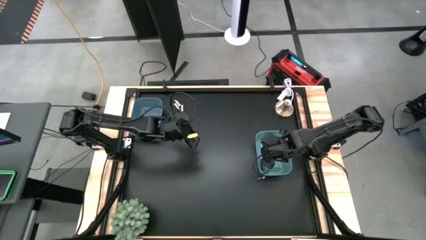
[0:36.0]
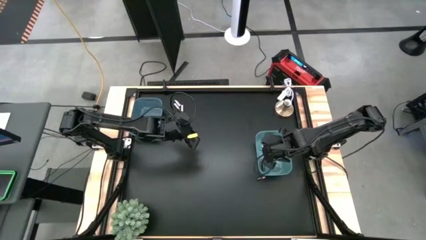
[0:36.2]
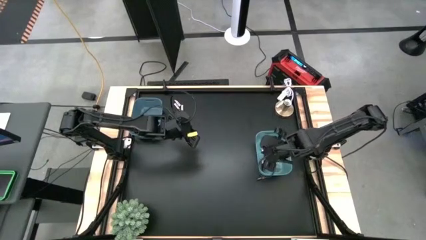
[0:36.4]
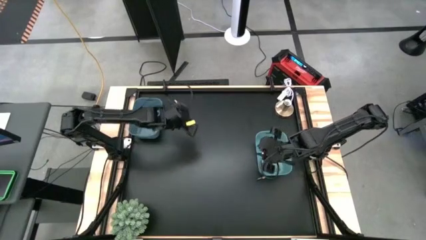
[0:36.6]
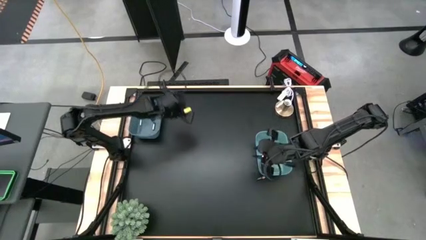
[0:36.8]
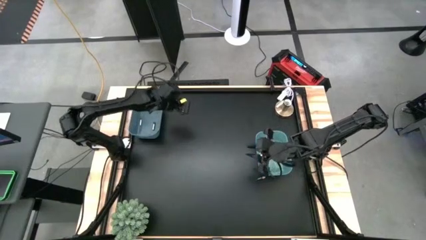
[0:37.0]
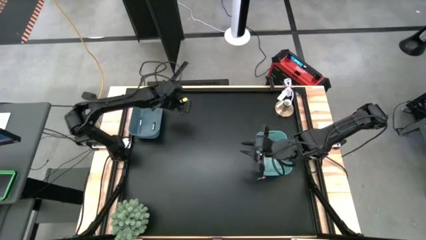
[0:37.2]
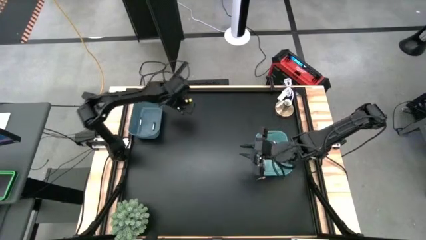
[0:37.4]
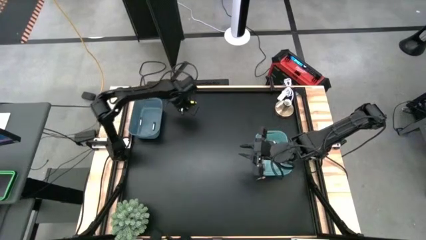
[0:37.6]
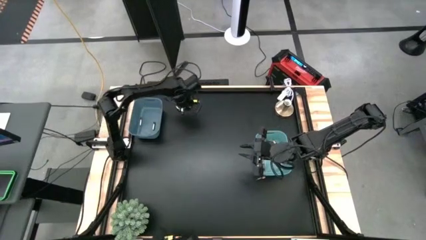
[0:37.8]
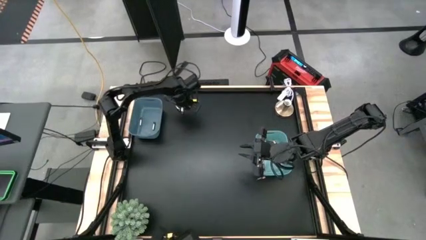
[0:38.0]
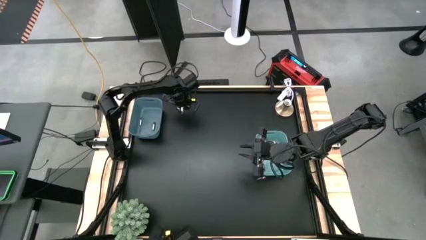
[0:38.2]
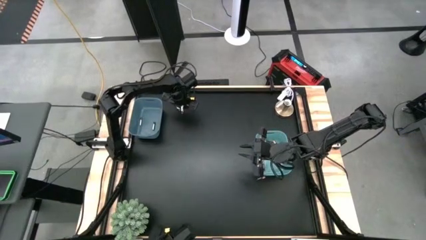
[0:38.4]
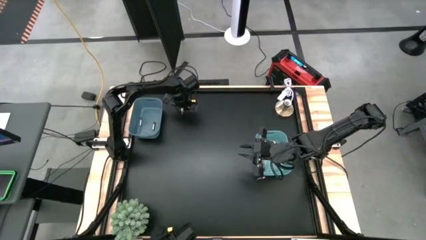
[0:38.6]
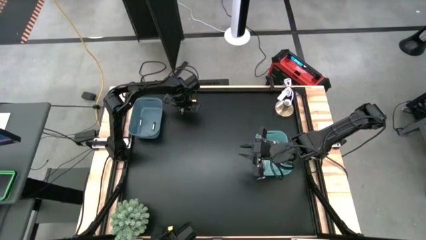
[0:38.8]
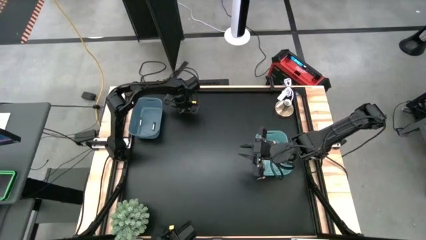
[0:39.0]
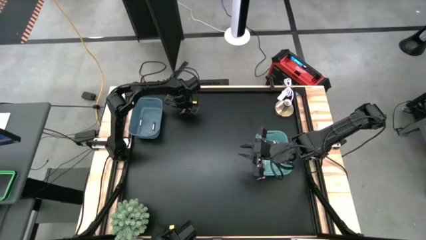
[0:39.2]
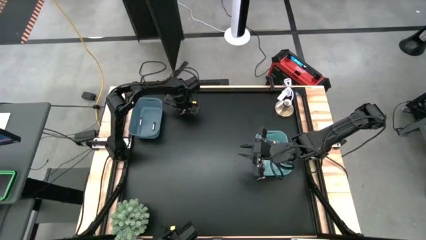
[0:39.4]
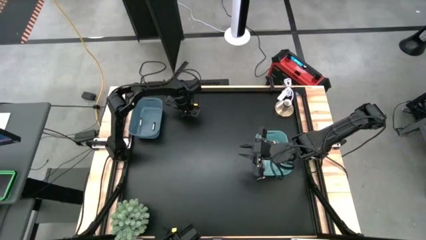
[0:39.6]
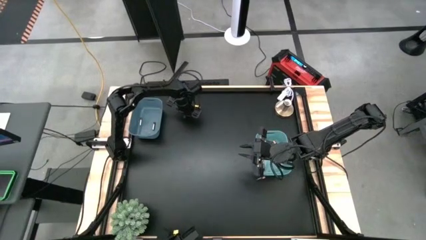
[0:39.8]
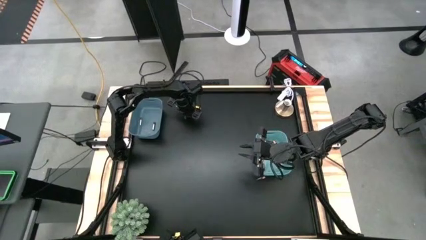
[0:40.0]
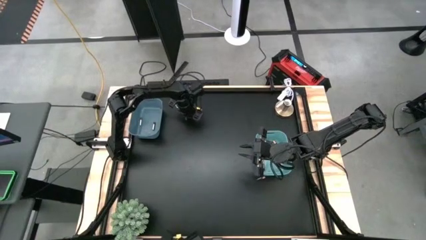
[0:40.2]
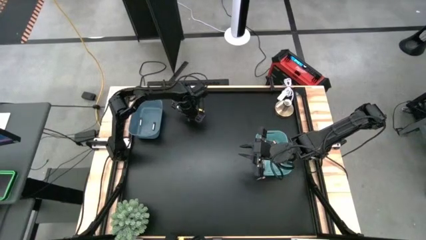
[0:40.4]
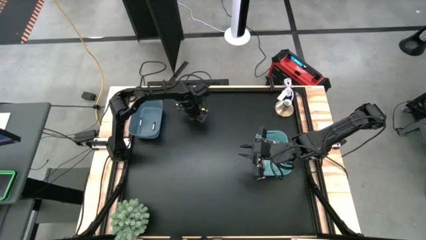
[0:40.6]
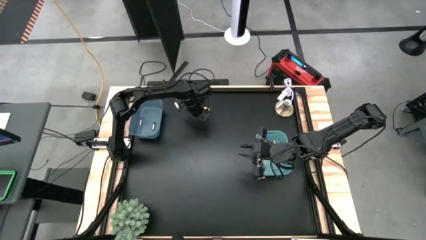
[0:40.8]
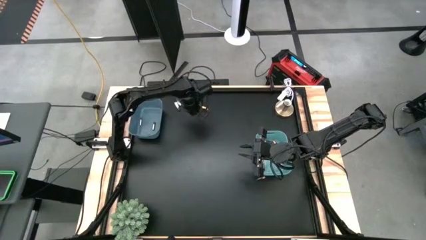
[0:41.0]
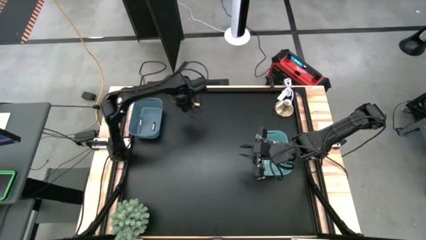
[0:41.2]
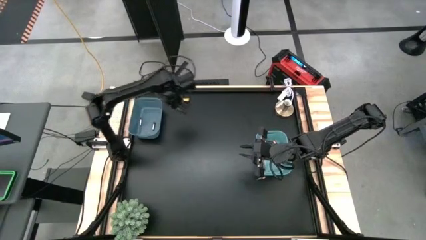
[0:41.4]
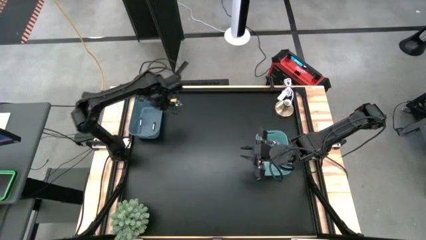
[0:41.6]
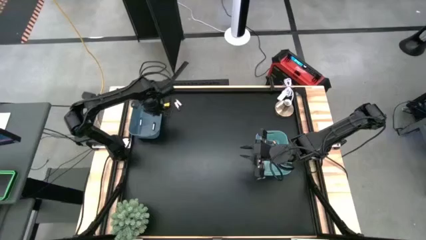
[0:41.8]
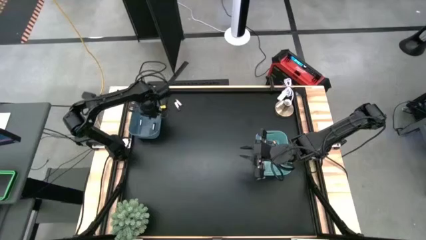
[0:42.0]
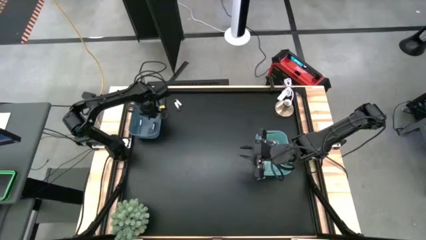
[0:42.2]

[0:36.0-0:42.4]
Task: Sort batteries
Put the silver battery into the blue bin

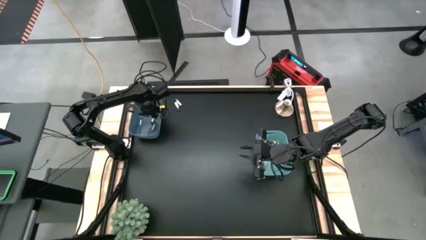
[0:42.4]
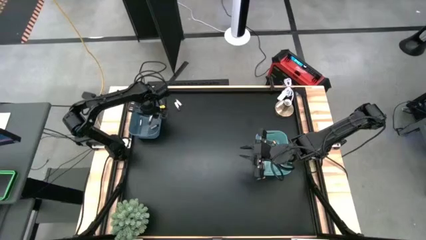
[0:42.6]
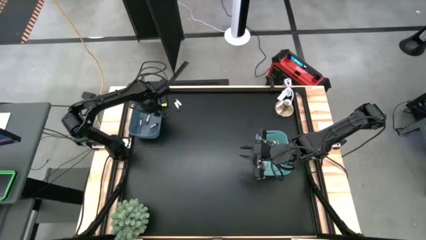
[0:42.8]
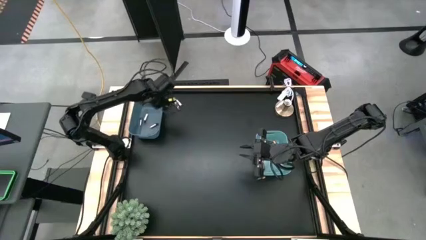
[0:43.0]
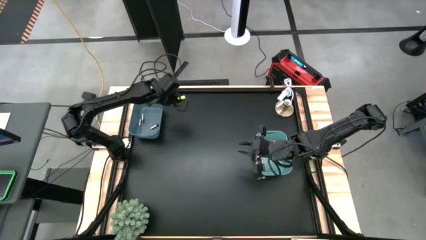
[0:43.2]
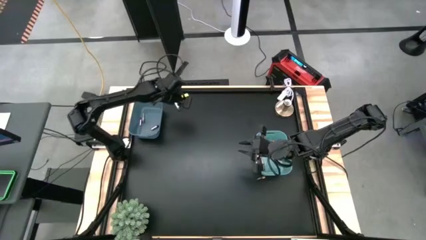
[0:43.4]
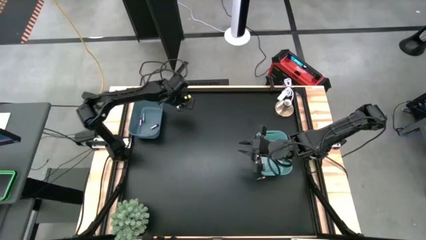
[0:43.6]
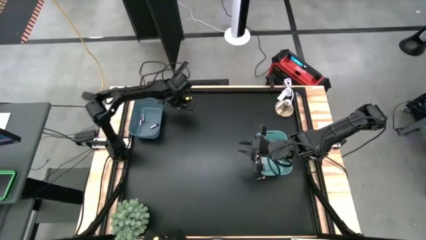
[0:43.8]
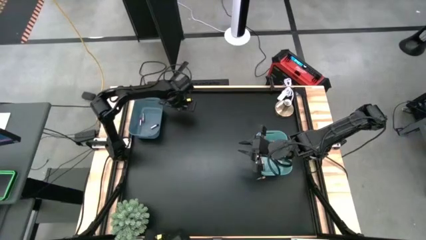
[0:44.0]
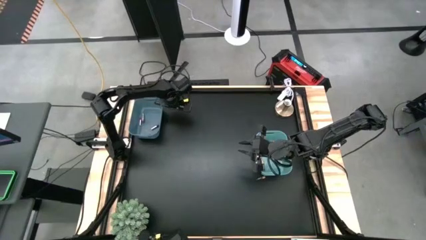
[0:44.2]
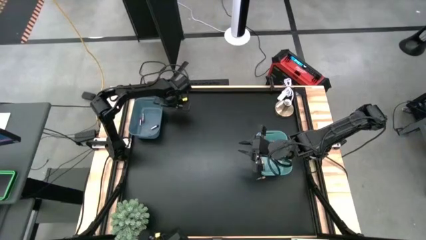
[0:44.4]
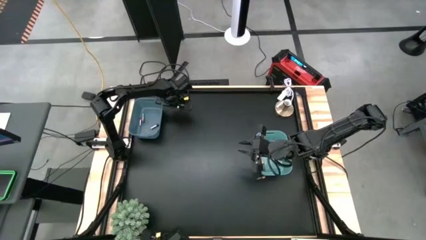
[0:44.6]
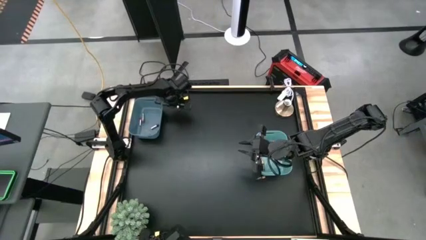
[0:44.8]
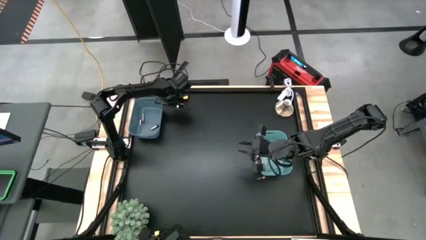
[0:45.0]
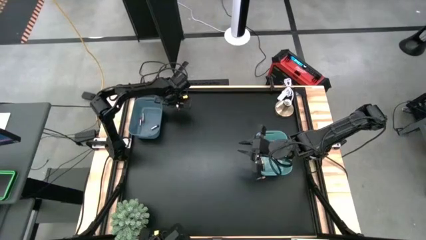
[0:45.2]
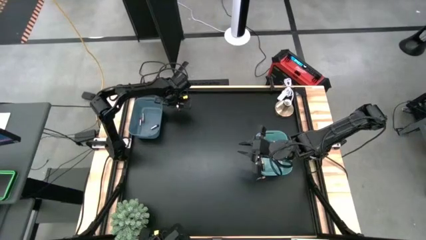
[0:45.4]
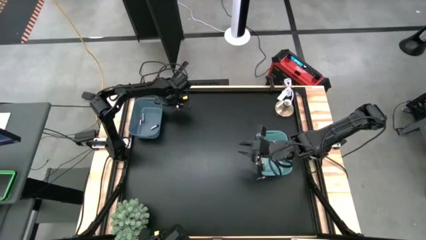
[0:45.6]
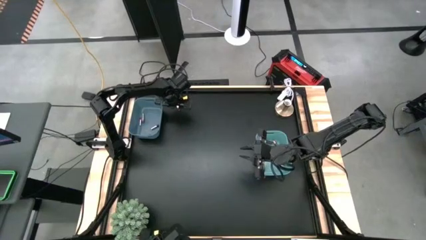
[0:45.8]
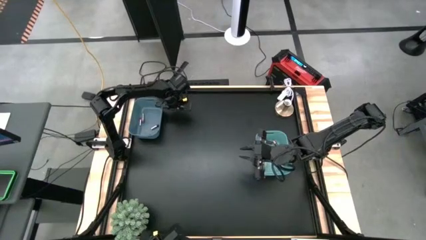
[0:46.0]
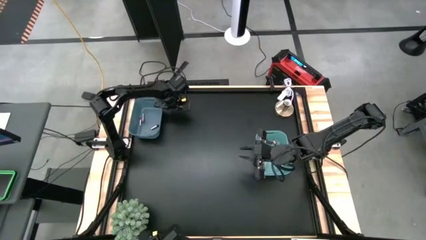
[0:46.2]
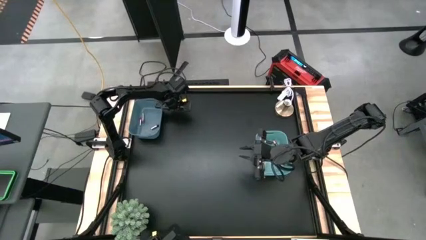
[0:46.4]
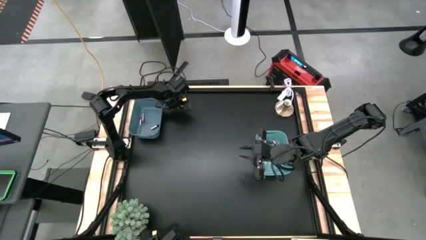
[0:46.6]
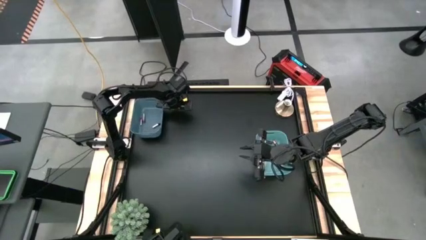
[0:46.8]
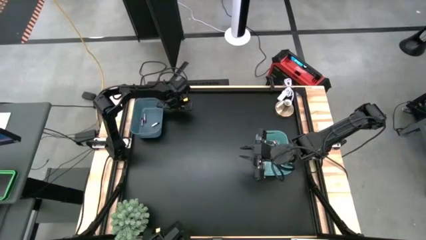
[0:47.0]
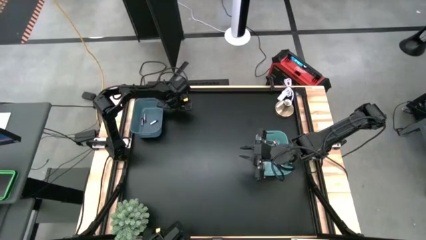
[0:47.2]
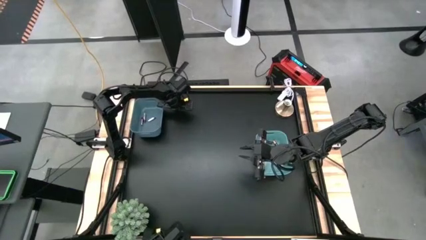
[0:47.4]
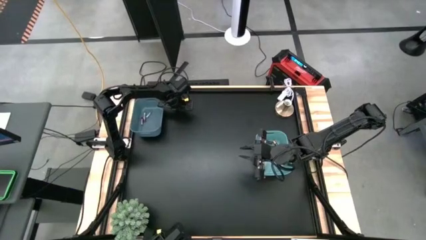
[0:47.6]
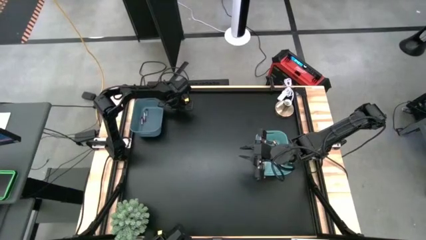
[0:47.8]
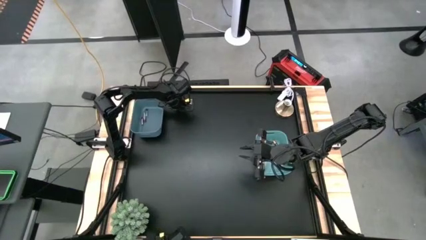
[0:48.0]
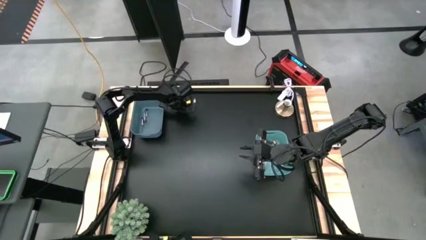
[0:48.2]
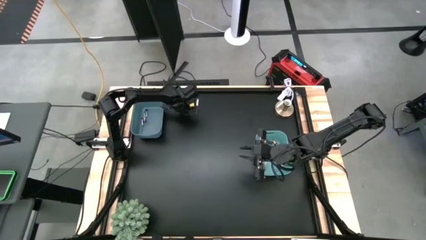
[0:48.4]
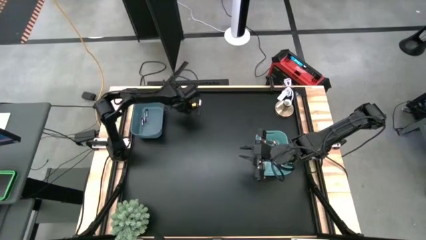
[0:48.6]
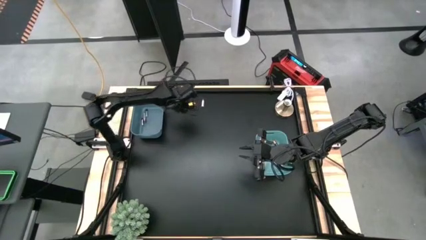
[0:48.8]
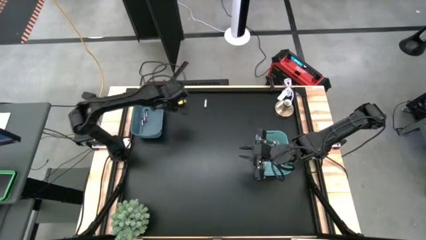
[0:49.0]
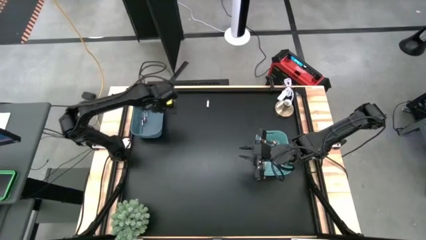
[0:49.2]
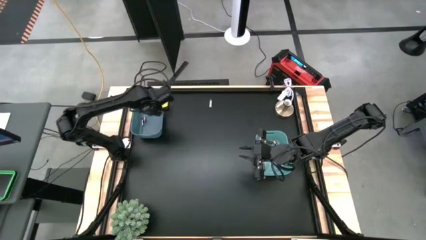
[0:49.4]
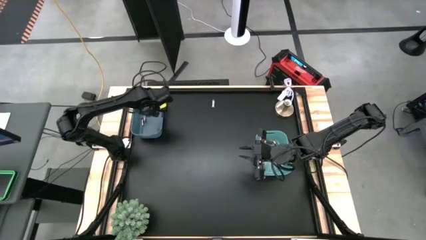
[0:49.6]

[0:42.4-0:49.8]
Put the silver battery into the blue bin

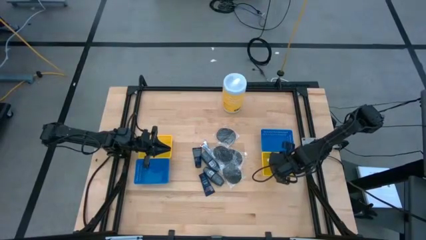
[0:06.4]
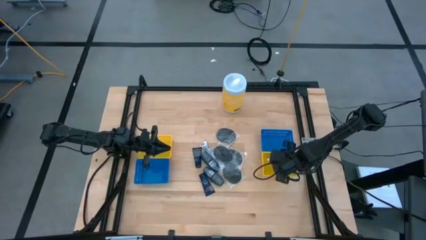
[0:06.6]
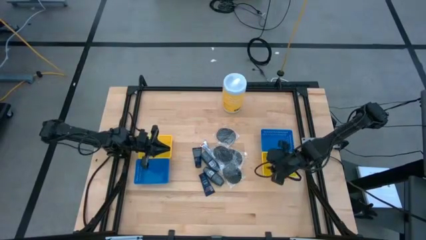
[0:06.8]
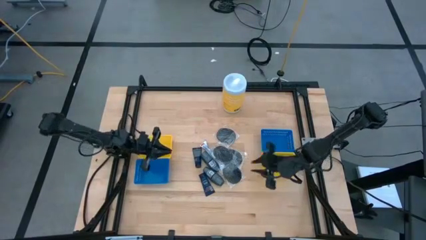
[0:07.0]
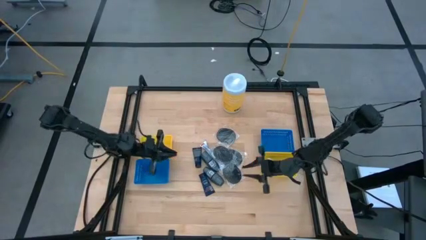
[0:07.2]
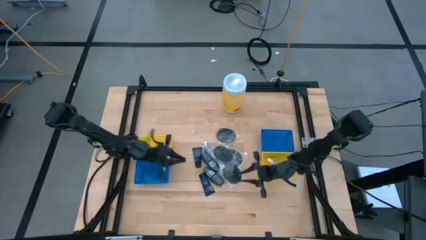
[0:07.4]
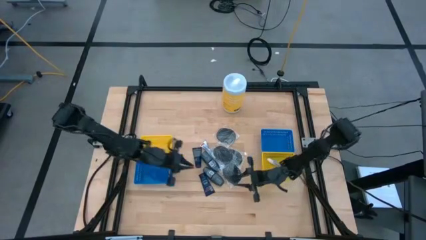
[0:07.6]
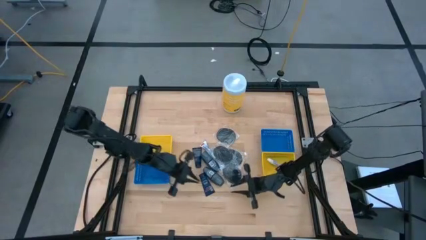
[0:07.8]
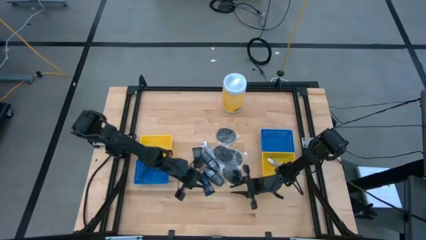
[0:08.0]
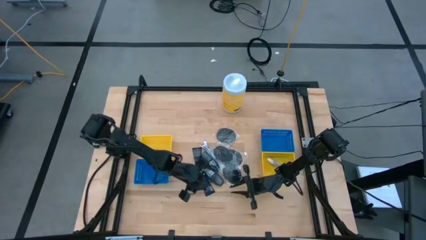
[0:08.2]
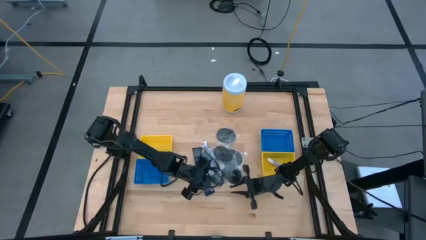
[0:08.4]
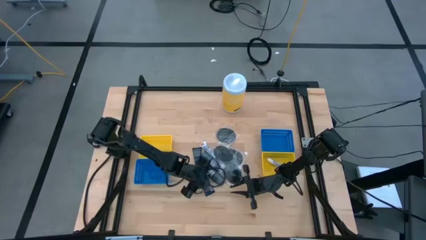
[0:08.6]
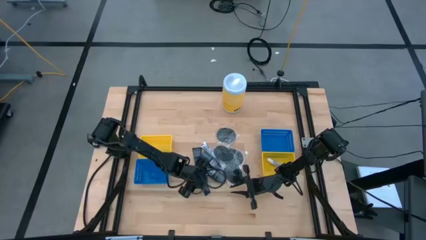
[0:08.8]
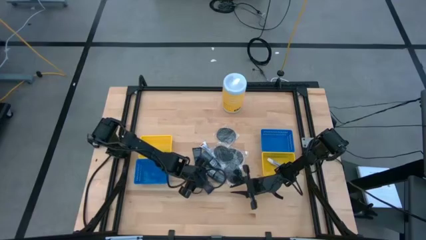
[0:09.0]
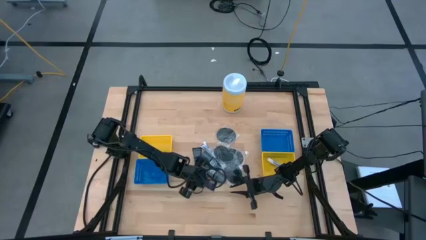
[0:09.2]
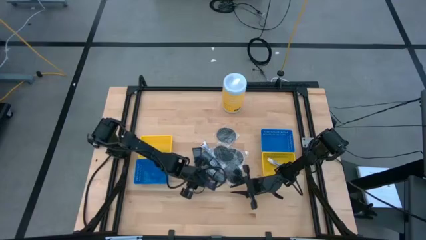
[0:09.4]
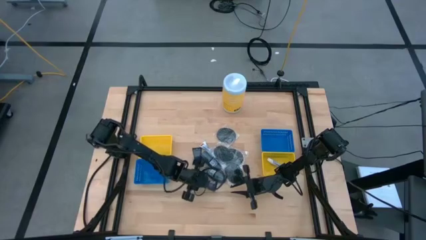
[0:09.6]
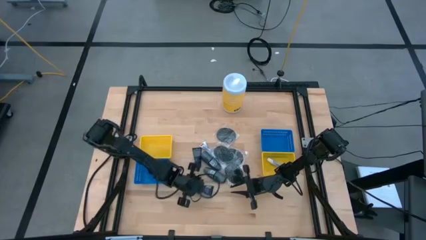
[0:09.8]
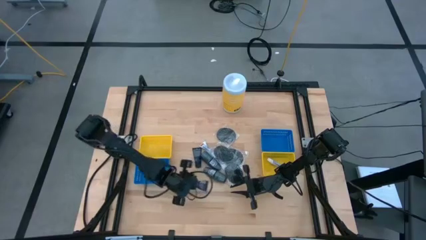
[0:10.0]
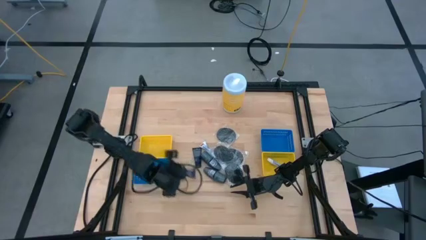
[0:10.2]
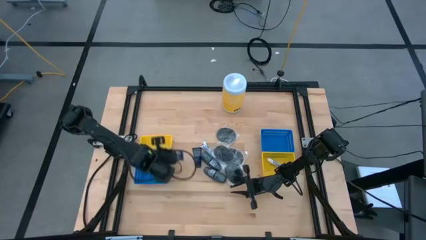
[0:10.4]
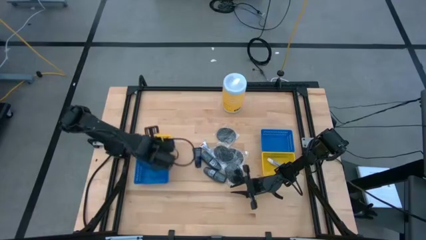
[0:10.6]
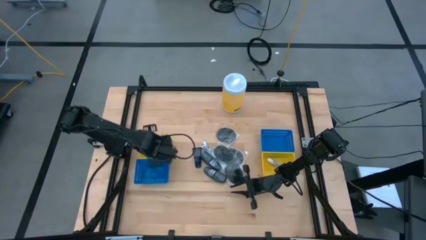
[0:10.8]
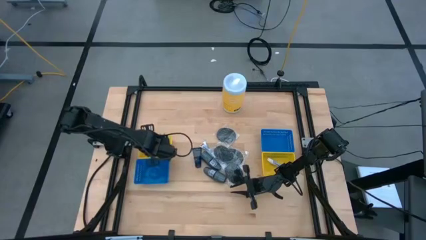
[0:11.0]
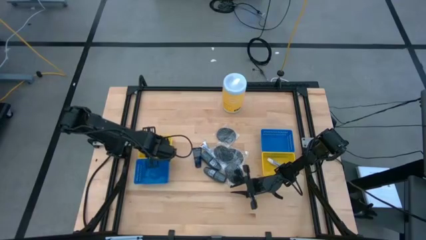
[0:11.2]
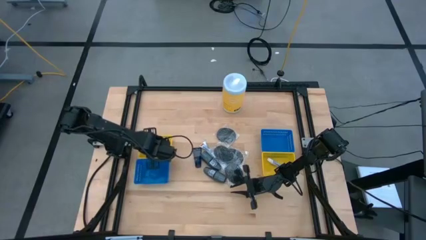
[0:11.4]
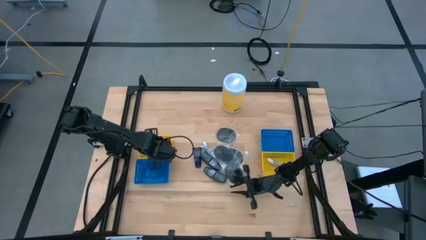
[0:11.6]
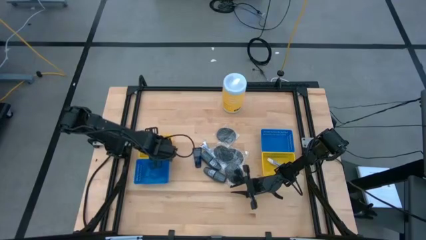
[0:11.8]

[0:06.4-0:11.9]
Task: Pick & Place Travel size toiletries
Put the bottom blue shaving cream into the left yellow bin
